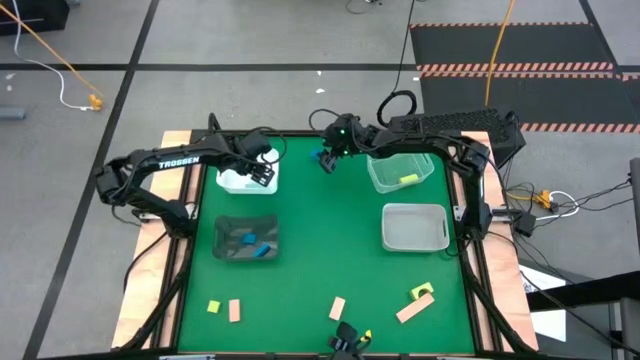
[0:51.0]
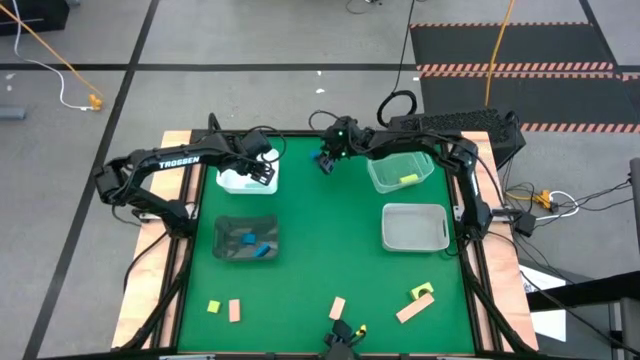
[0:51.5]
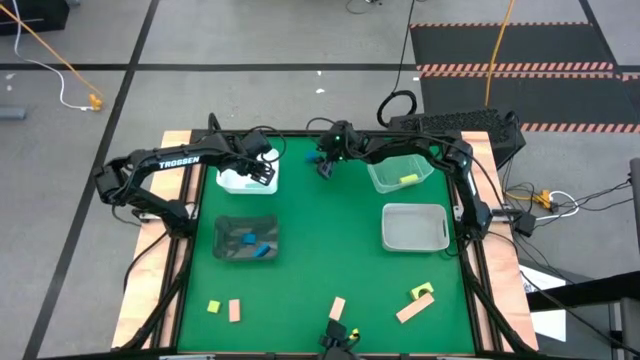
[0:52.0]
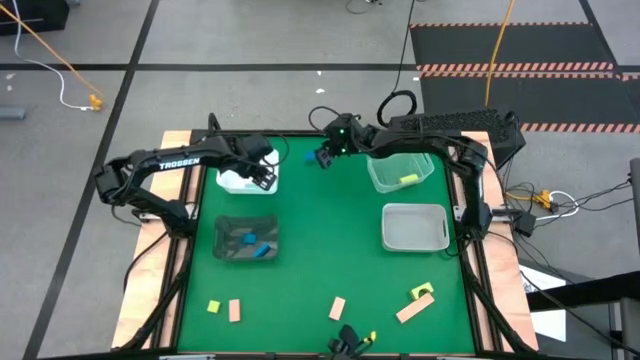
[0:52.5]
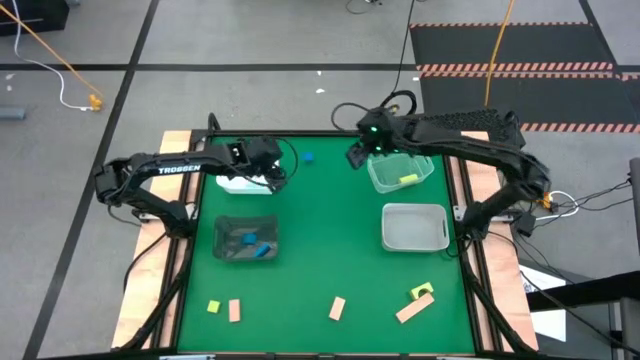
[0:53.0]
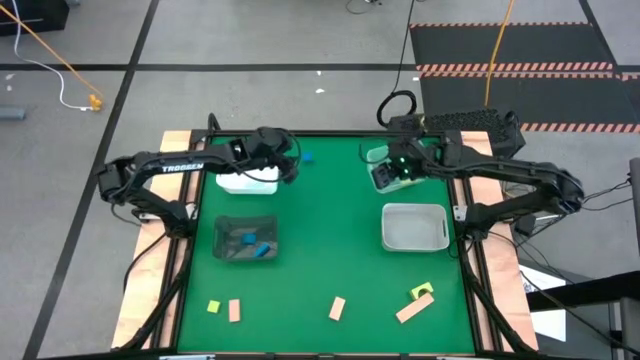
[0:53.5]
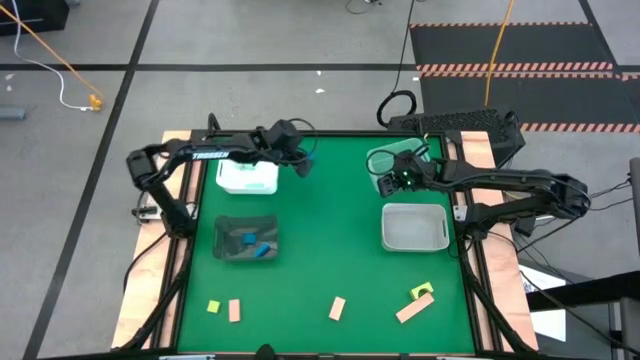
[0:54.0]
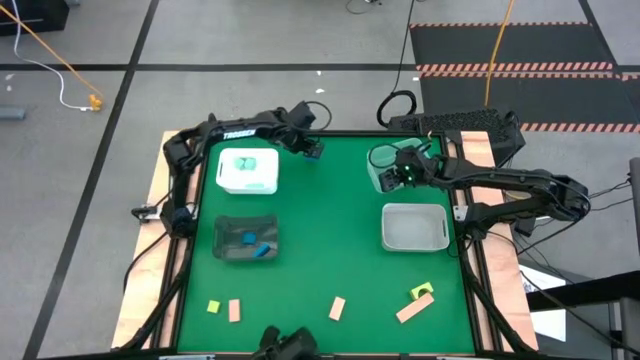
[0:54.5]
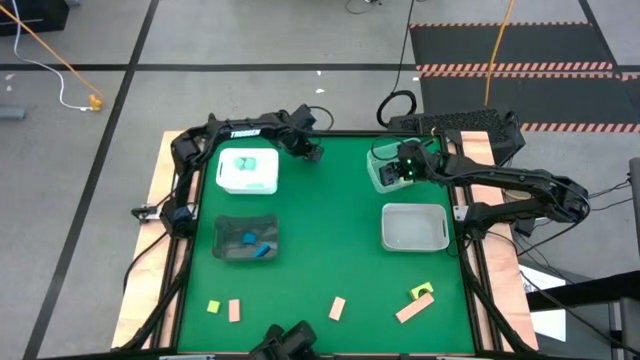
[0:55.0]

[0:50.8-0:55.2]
Task: Sort & place blocks by color
Put the blue block into the black bin

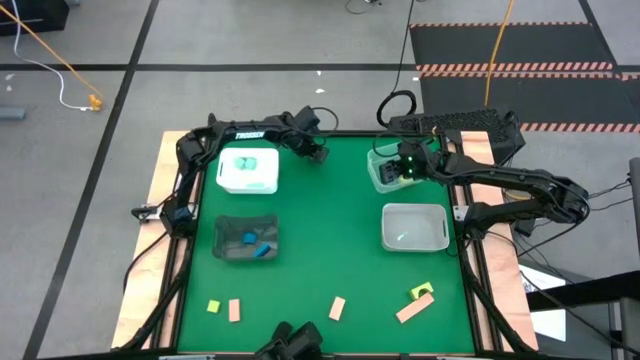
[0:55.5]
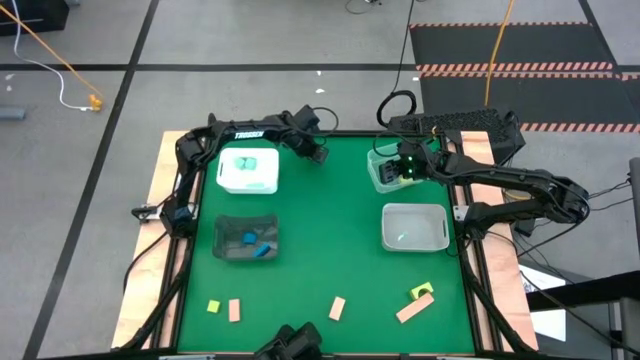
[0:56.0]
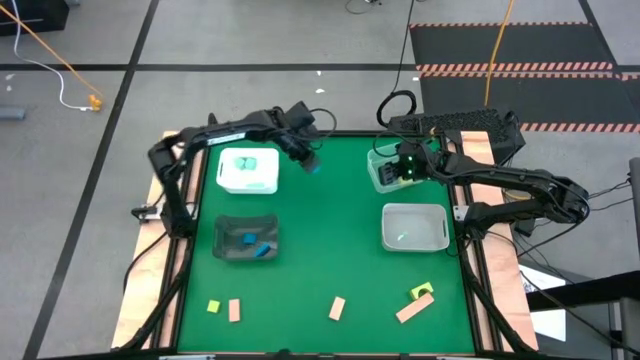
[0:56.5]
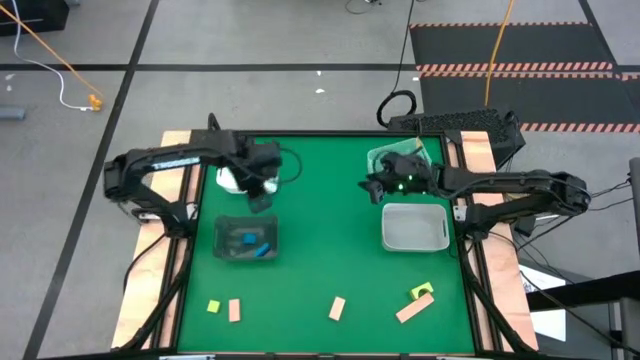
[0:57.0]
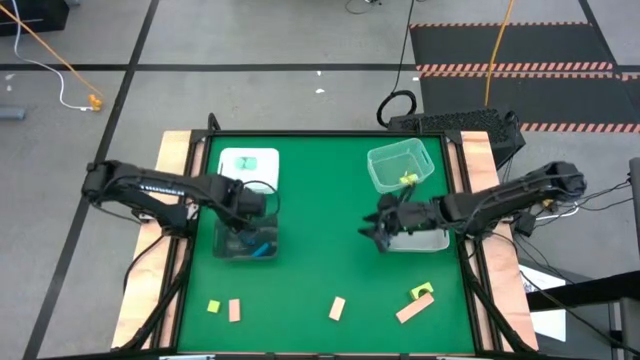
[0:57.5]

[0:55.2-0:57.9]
Put the blue block into the black bin

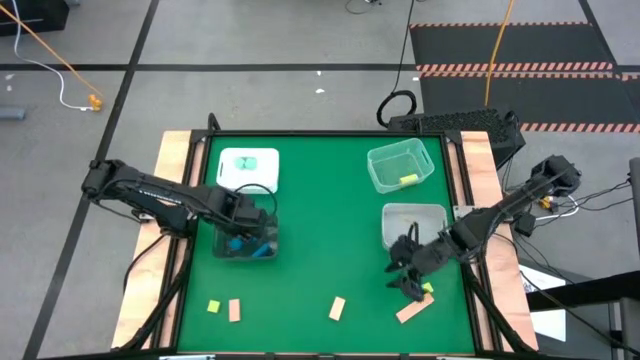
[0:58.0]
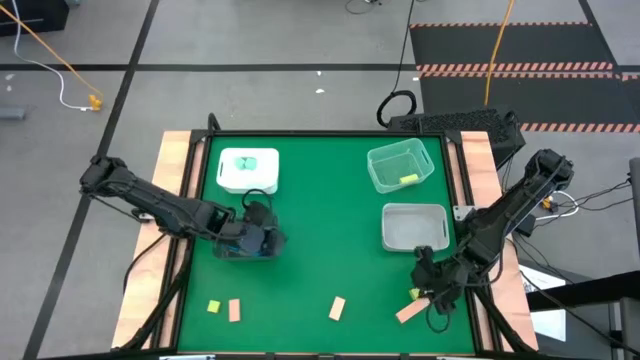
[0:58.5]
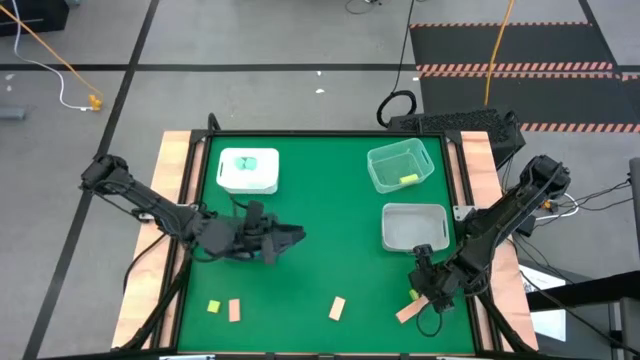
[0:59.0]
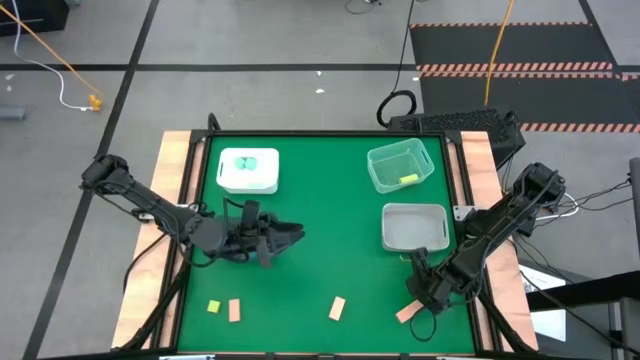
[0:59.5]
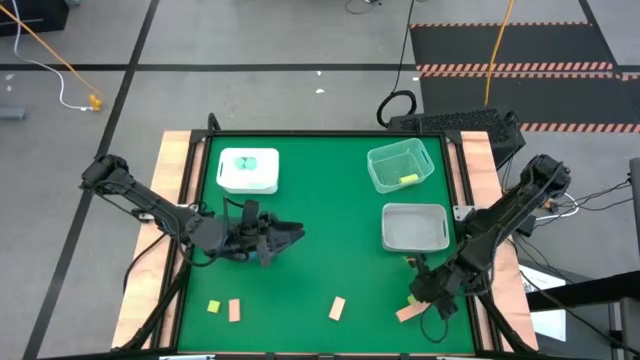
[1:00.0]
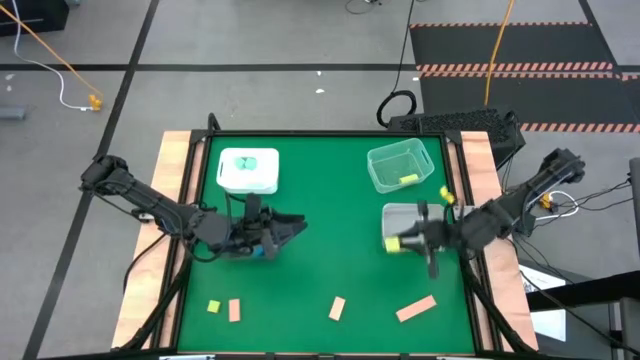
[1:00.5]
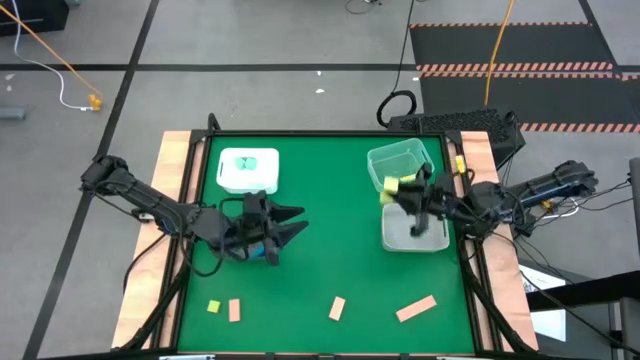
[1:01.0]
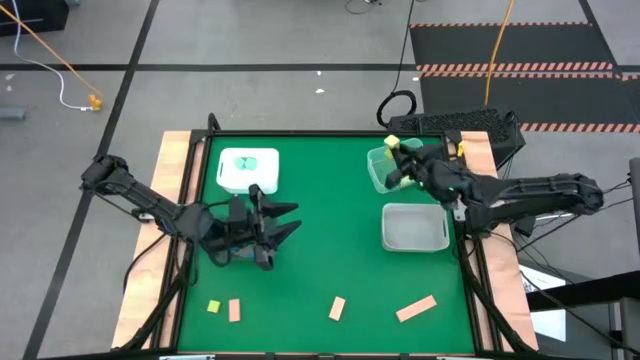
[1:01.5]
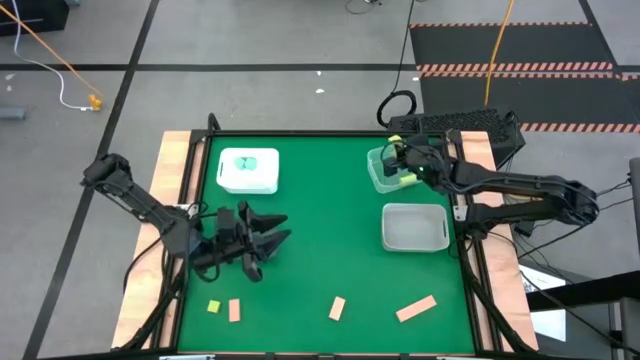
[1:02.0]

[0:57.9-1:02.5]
Put the light green block into the transparent bin

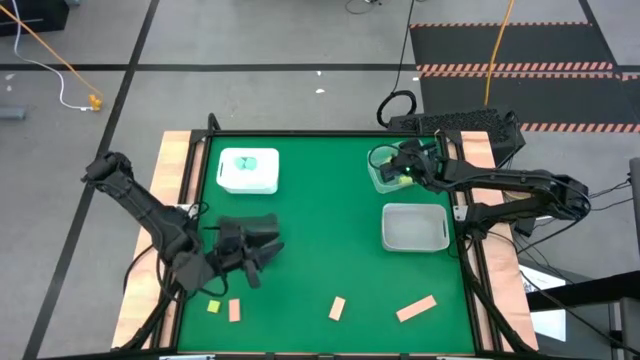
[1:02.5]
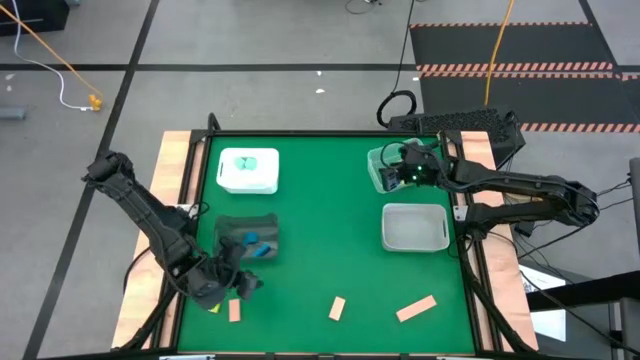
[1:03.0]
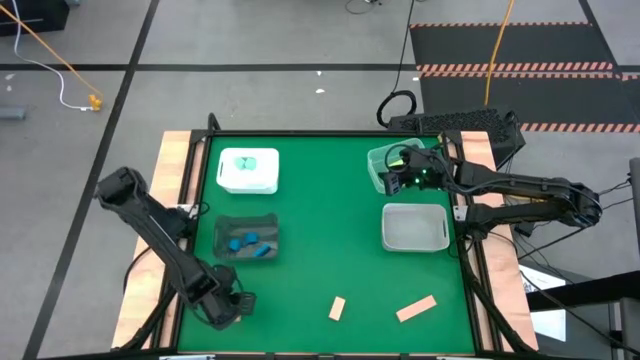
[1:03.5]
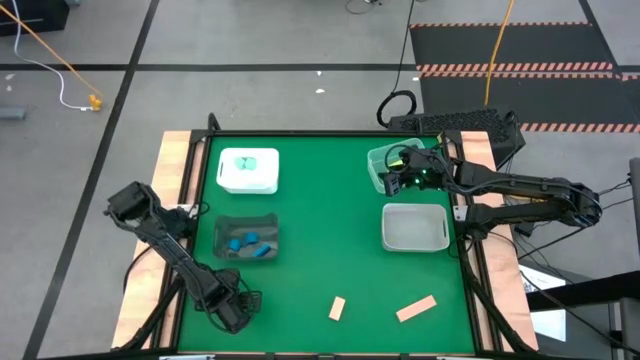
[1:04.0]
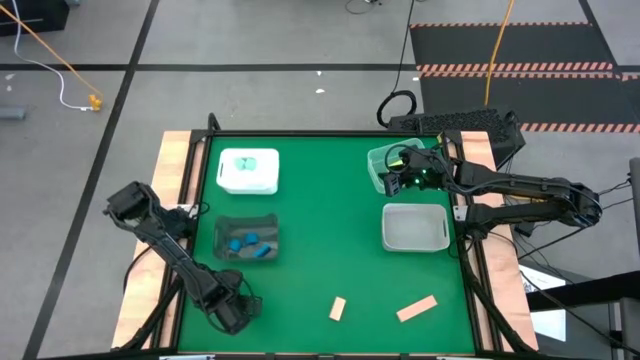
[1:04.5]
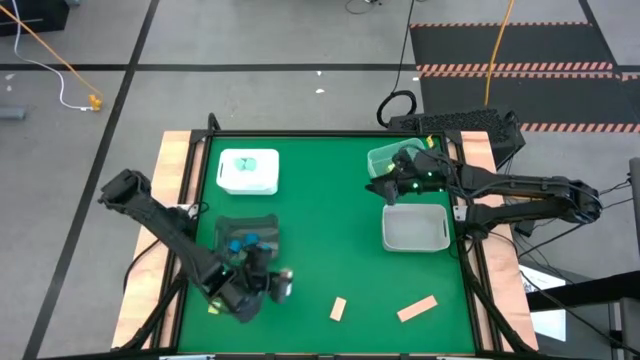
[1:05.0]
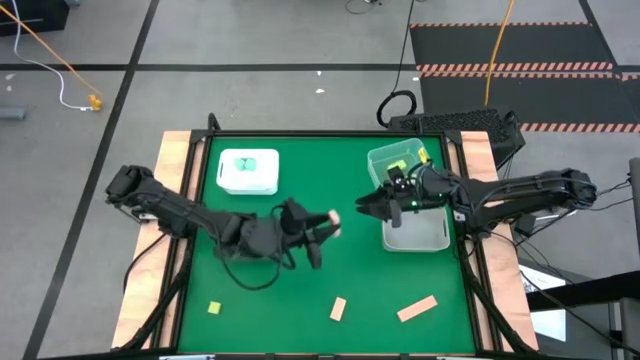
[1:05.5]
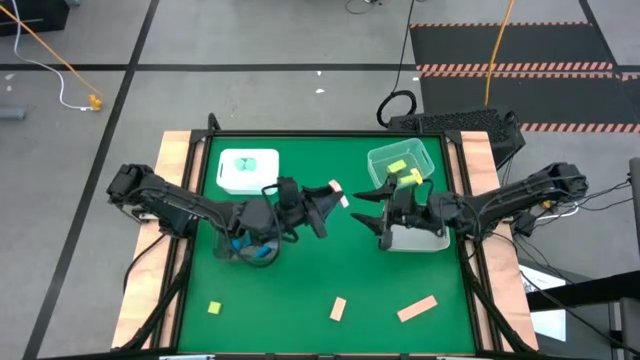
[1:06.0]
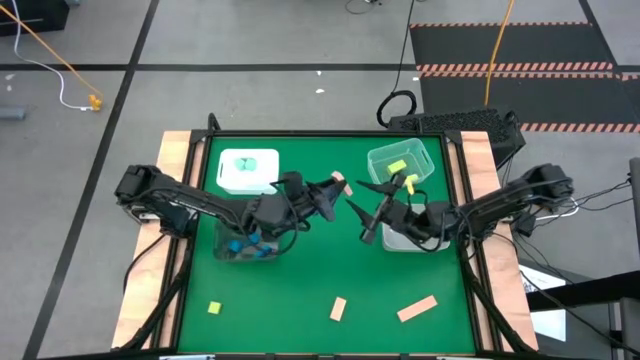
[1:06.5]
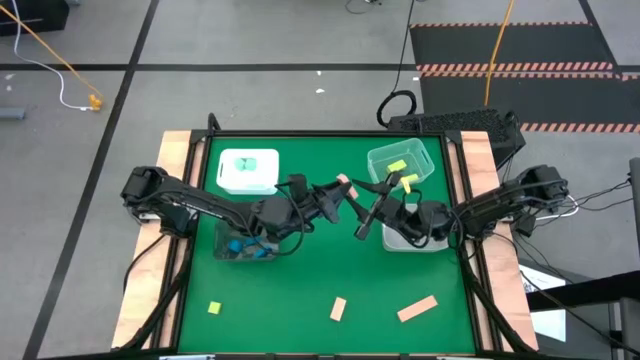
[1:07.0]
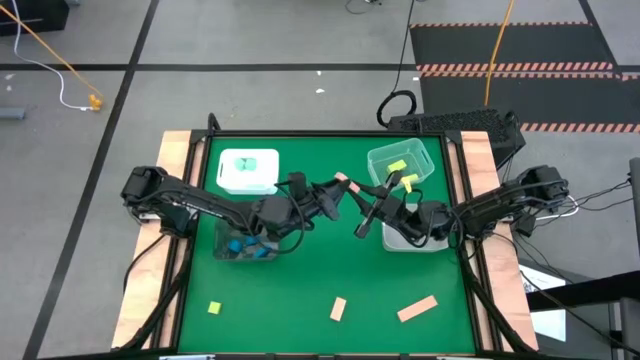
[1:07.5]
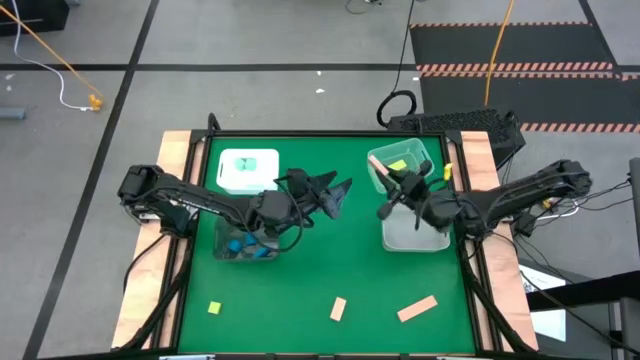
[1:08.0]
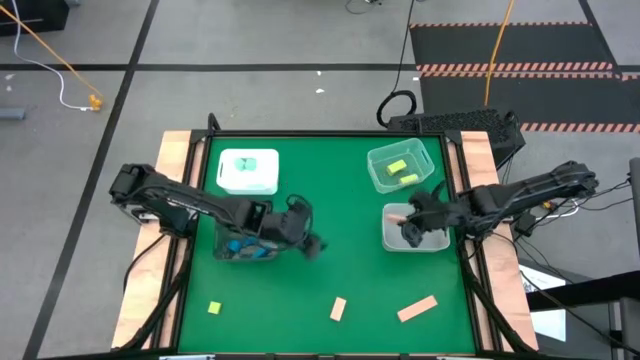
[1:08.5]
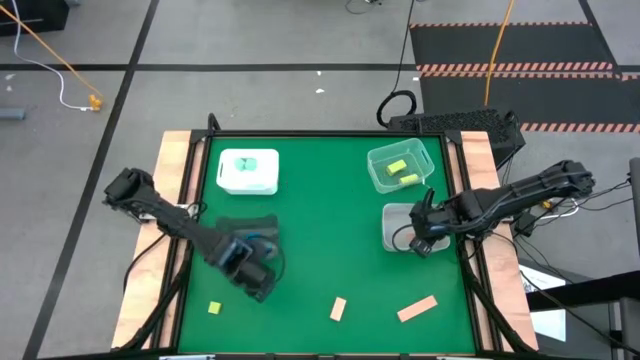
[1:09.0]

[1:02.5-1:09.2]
Put the brown block into the gray bin

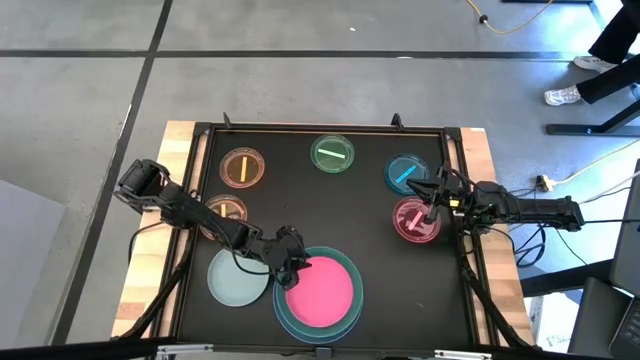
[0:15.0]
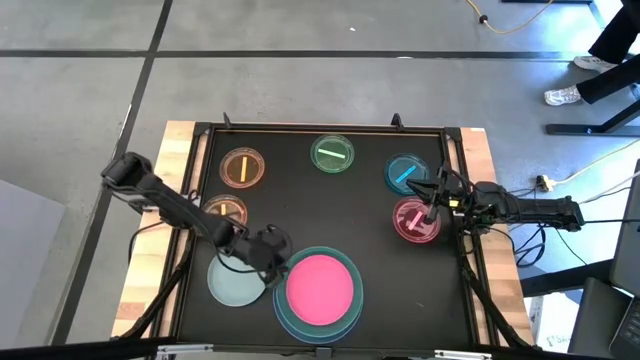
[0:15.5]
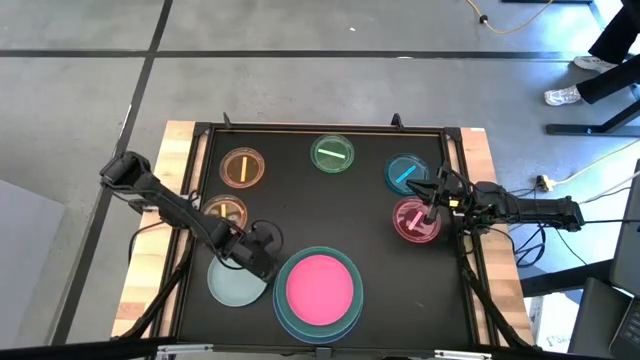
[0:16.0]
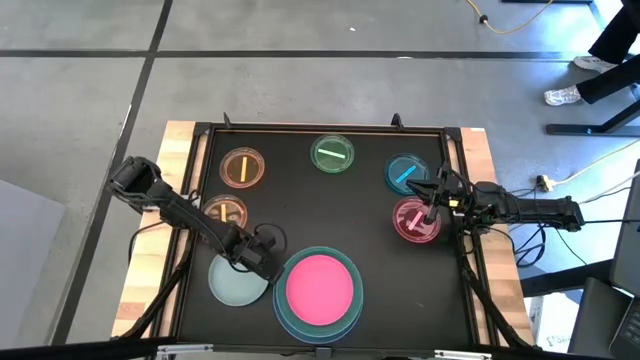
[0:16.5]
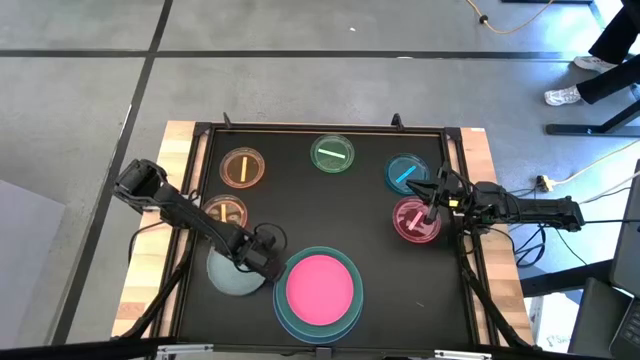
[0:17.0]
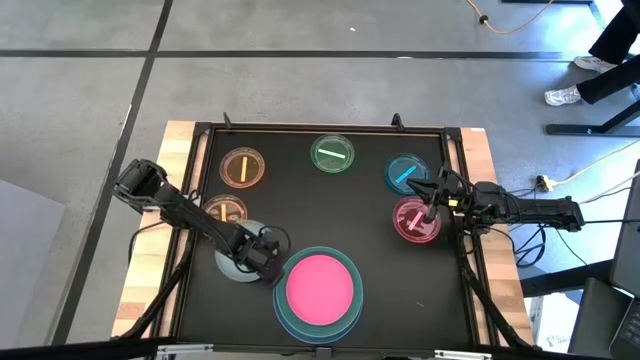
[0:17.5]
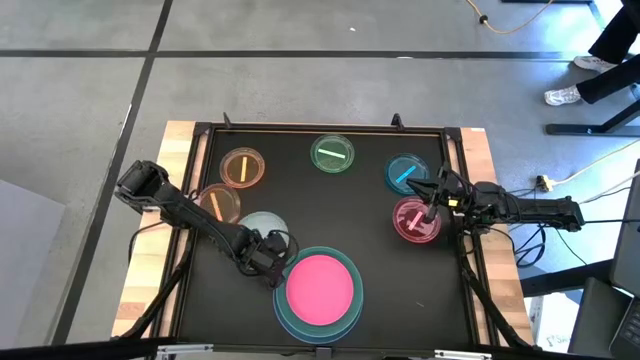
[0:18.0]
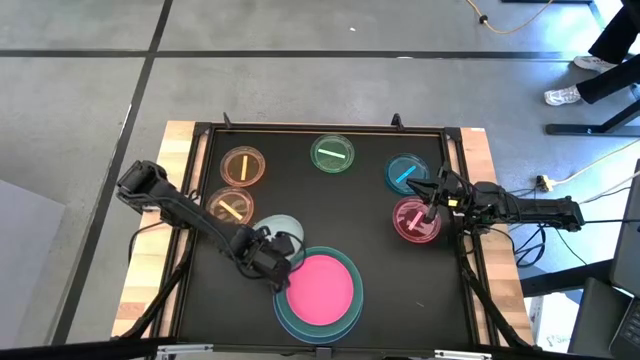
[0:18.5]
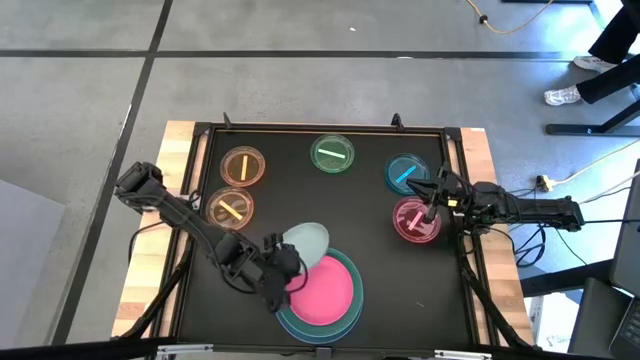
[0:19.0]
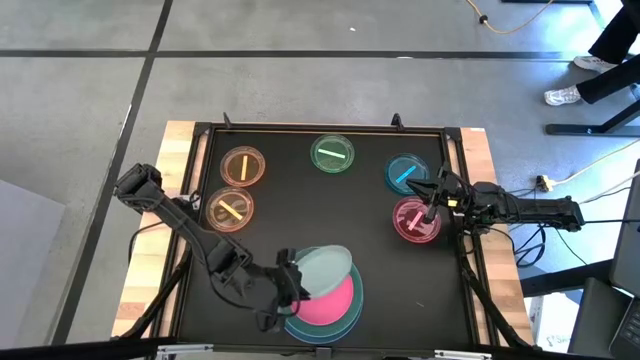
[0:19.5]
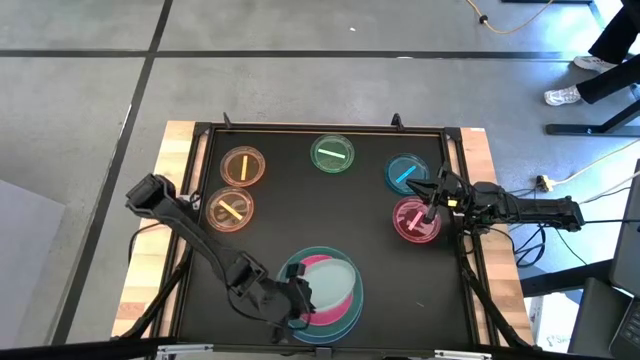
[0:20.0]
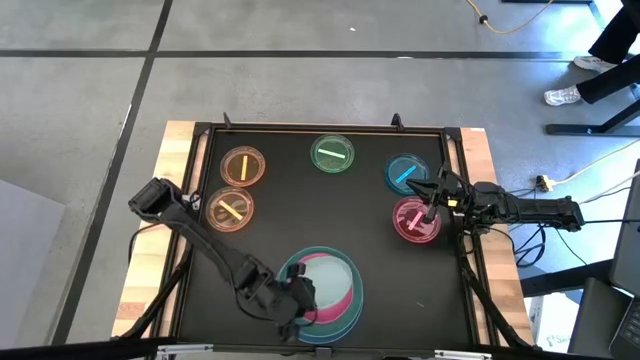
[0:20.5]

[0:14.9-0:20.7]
Task: Stack plastic plates
Stack the white plate on the dark pink plate
